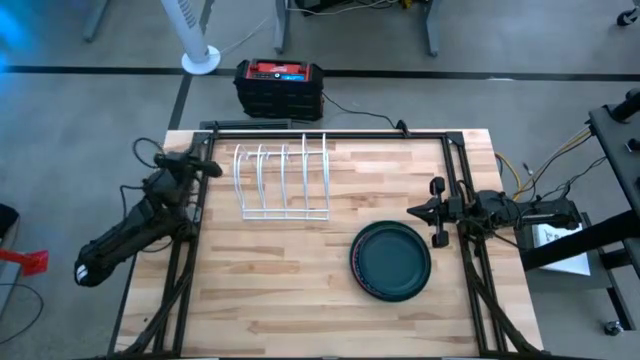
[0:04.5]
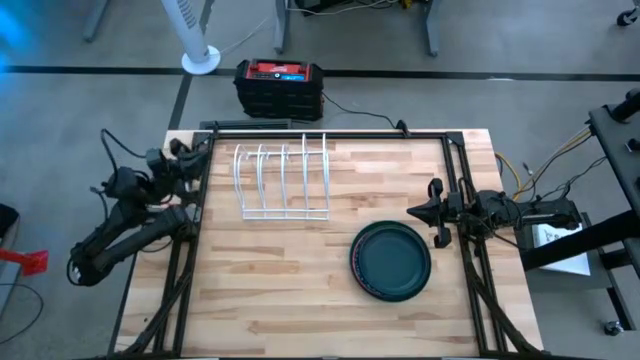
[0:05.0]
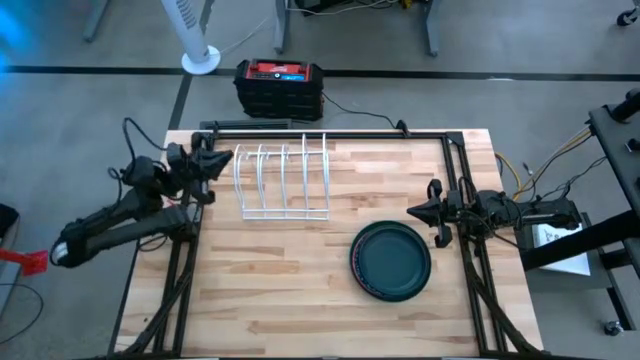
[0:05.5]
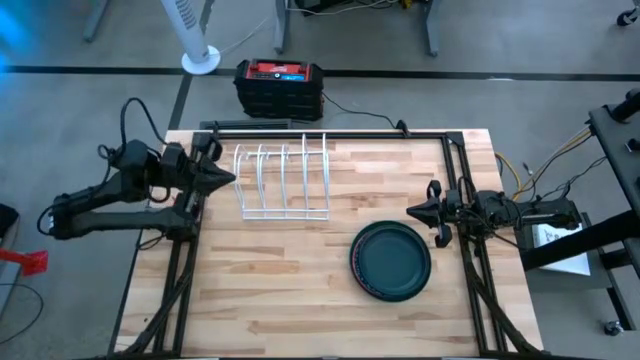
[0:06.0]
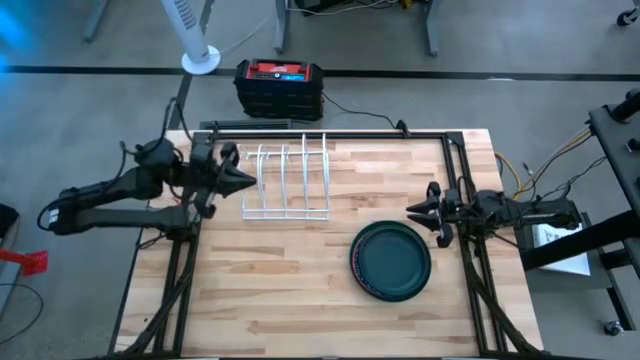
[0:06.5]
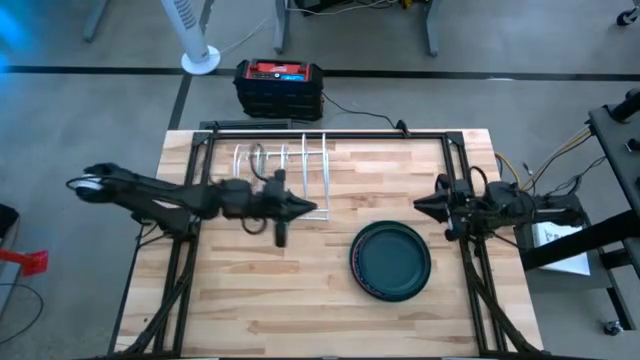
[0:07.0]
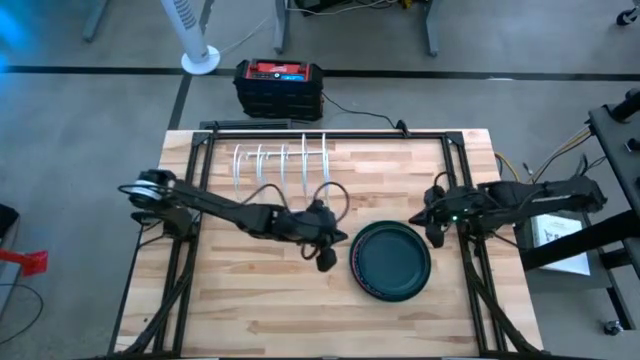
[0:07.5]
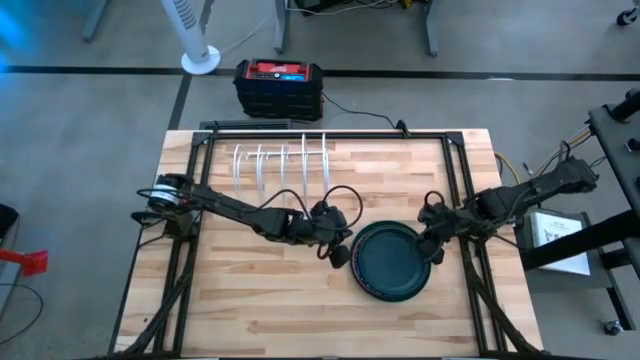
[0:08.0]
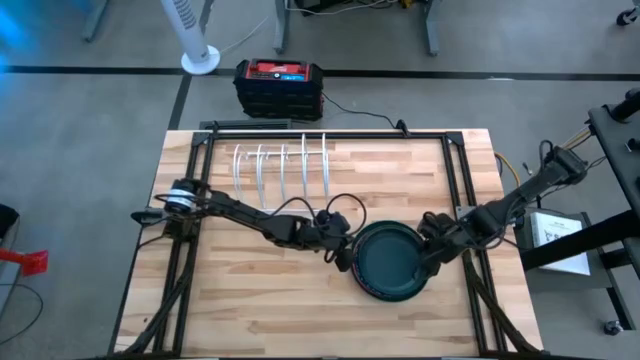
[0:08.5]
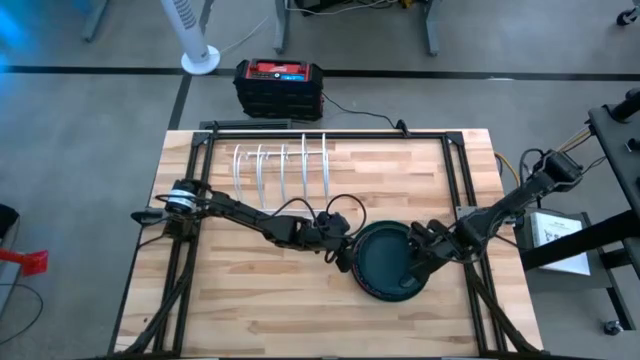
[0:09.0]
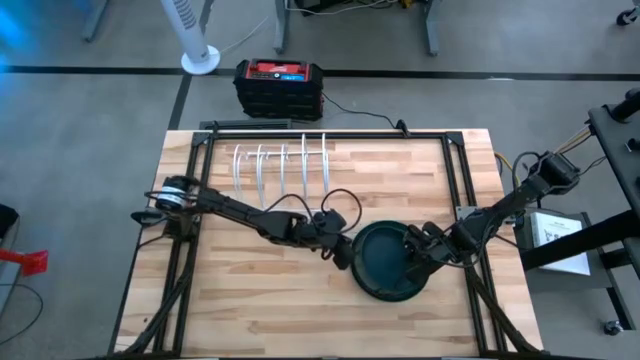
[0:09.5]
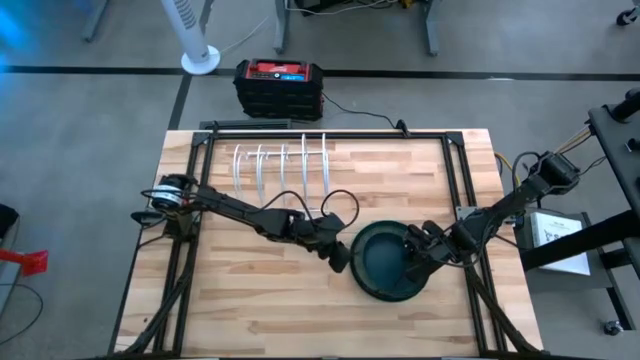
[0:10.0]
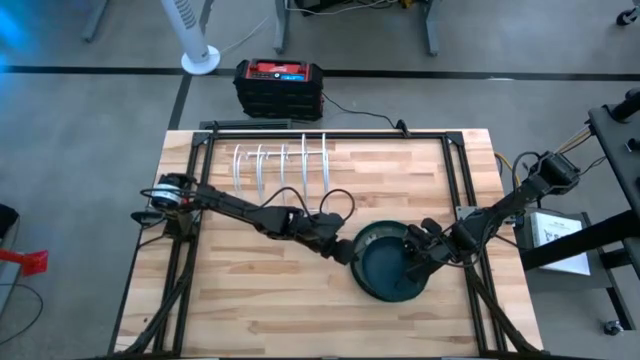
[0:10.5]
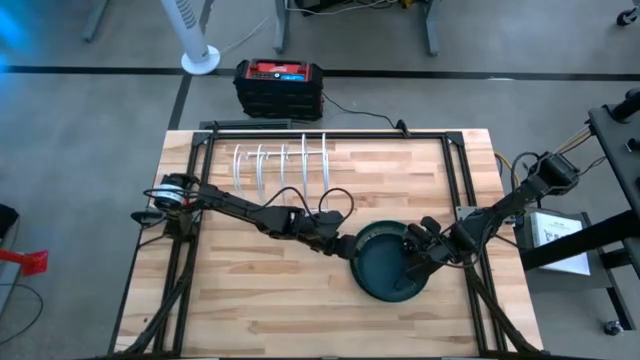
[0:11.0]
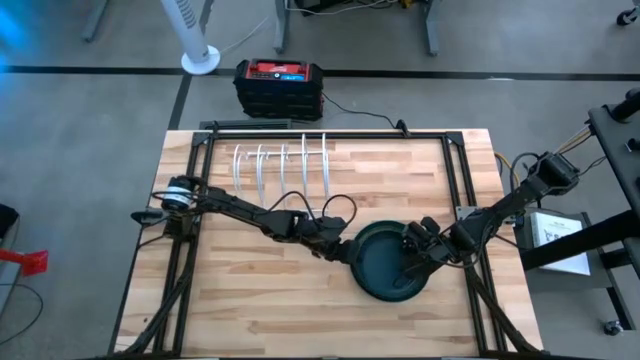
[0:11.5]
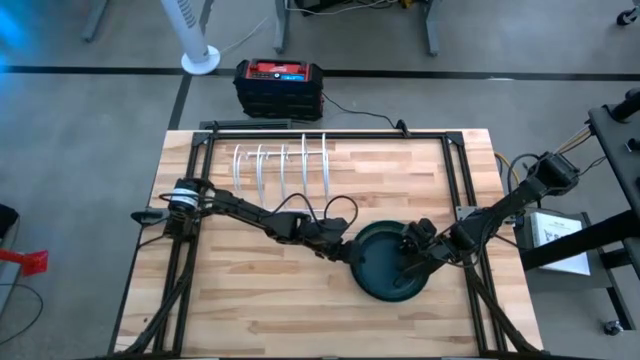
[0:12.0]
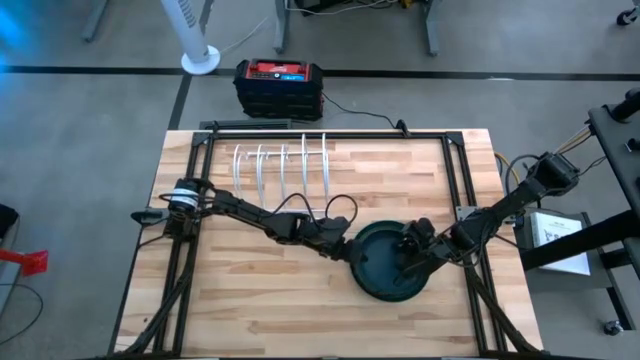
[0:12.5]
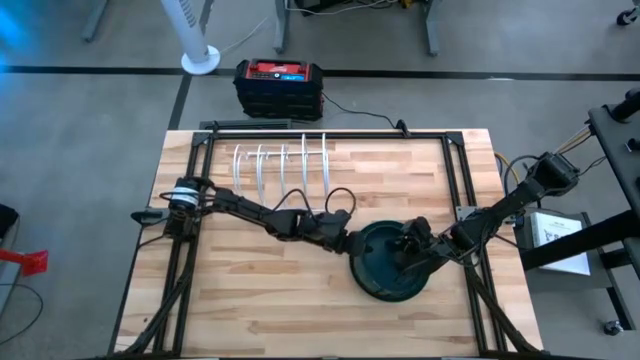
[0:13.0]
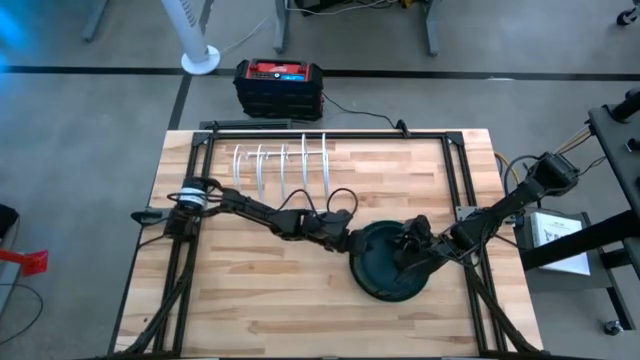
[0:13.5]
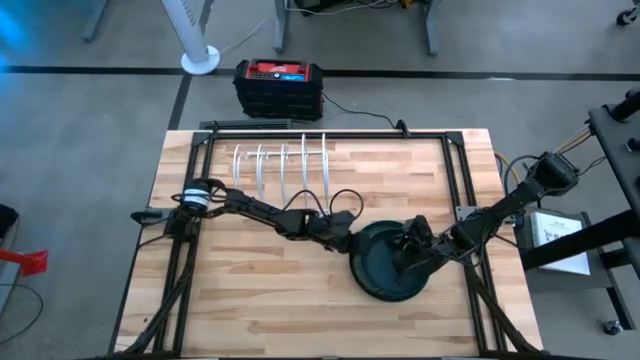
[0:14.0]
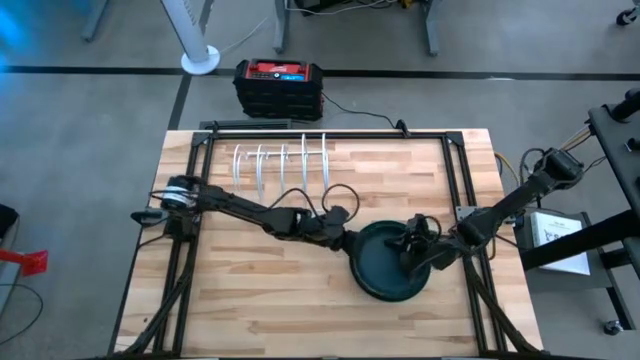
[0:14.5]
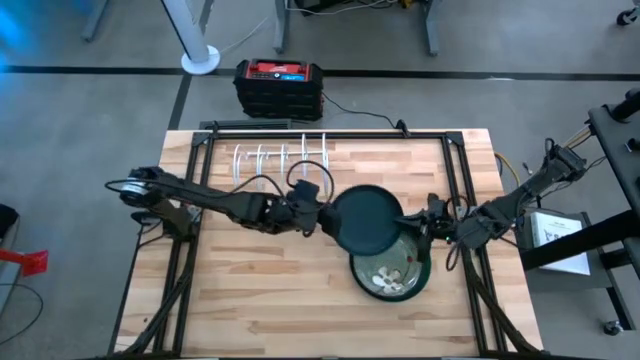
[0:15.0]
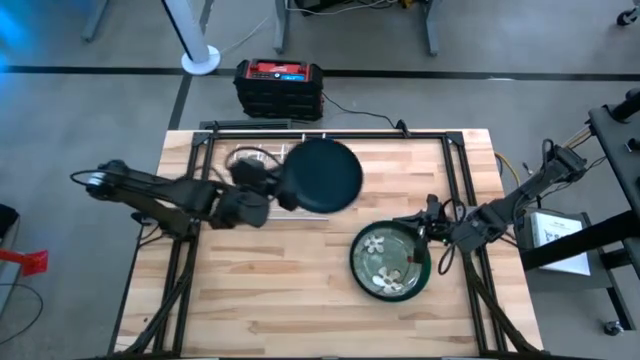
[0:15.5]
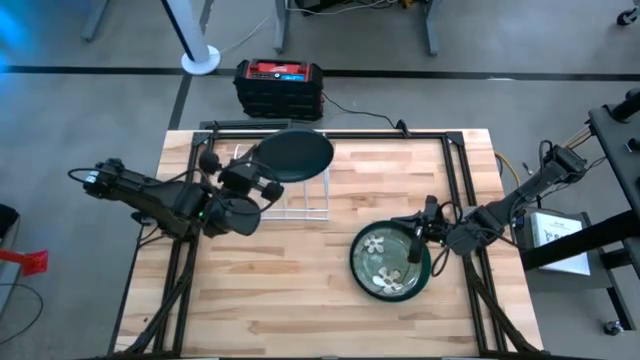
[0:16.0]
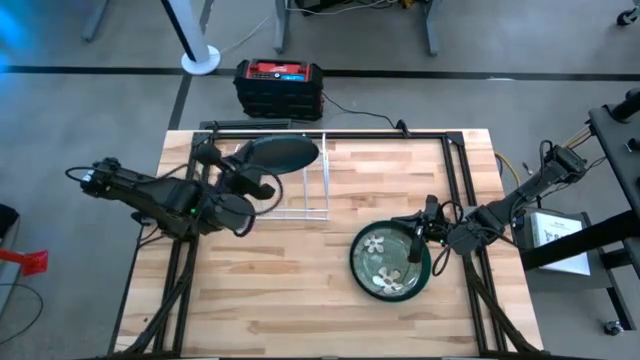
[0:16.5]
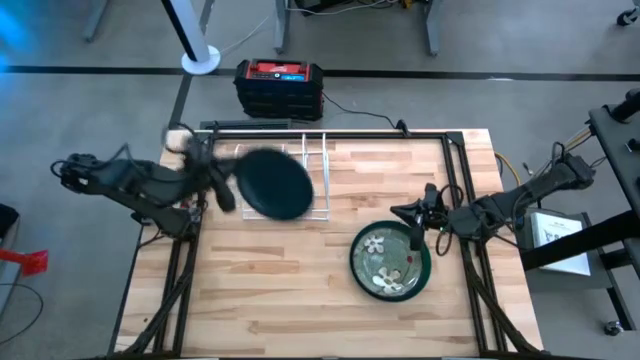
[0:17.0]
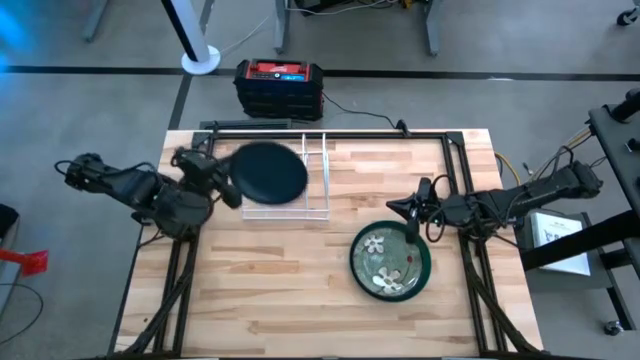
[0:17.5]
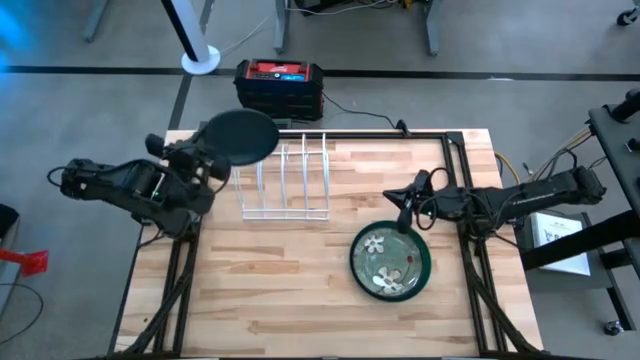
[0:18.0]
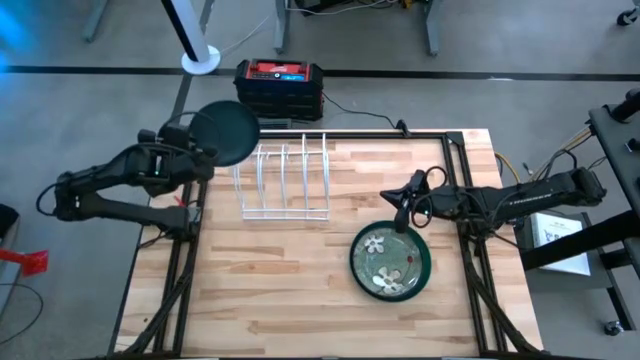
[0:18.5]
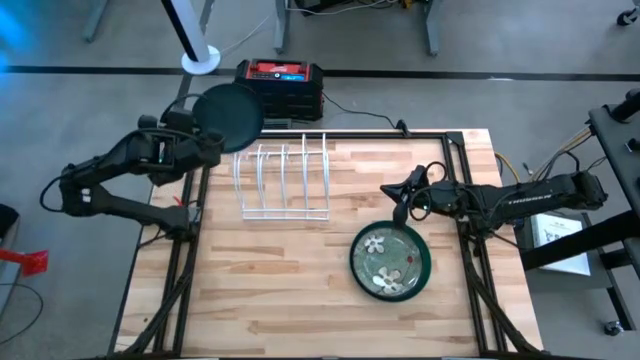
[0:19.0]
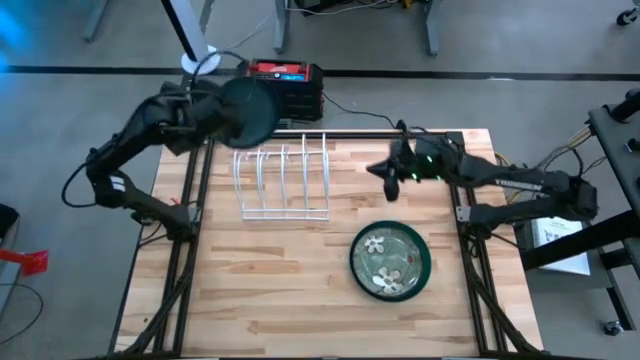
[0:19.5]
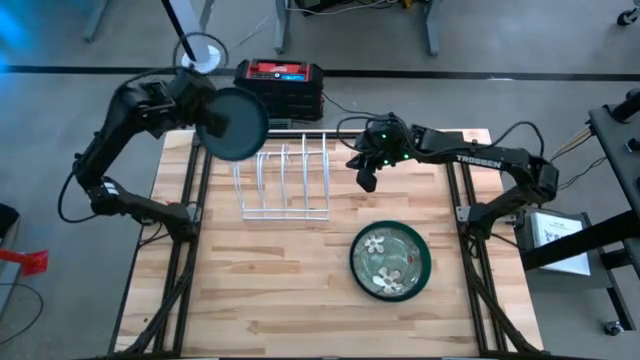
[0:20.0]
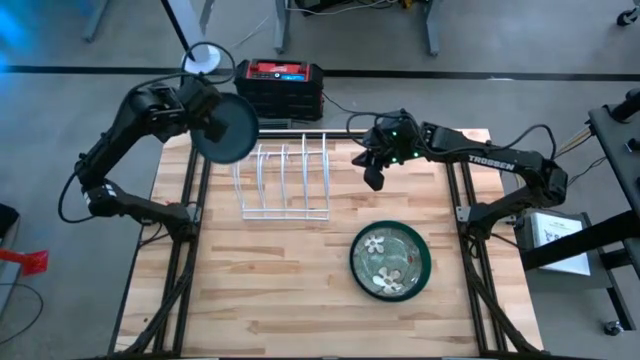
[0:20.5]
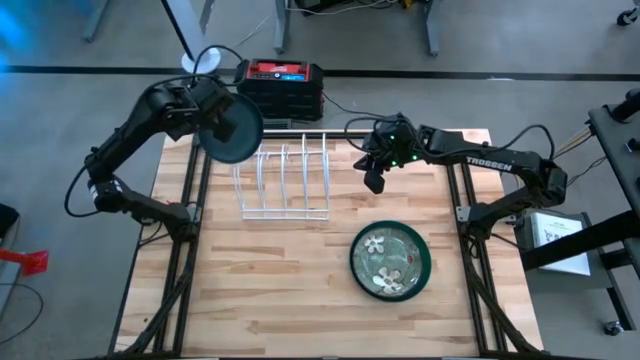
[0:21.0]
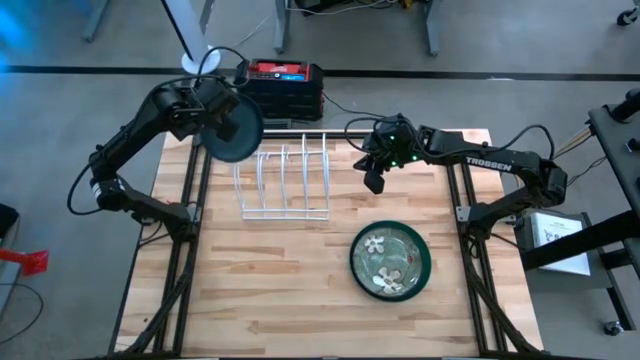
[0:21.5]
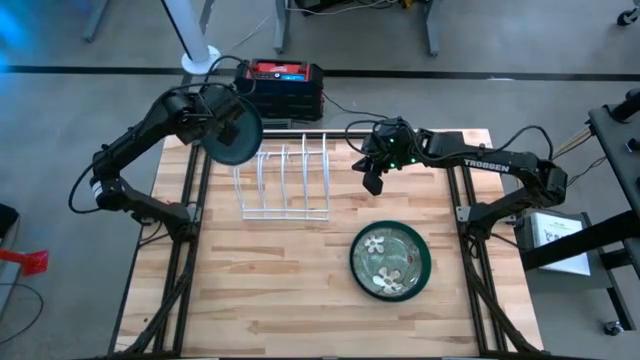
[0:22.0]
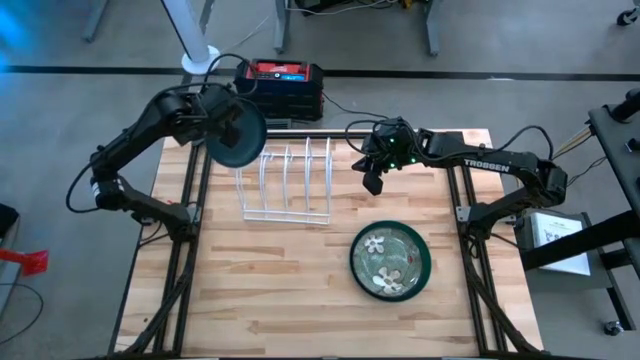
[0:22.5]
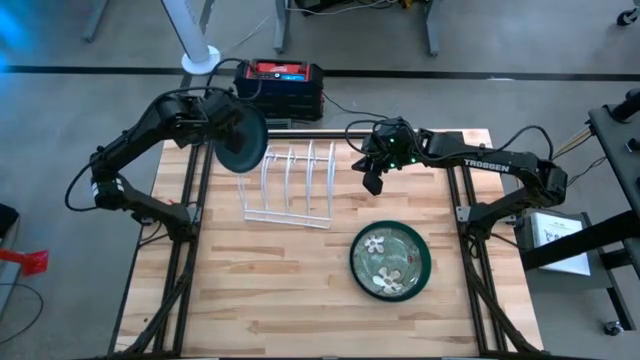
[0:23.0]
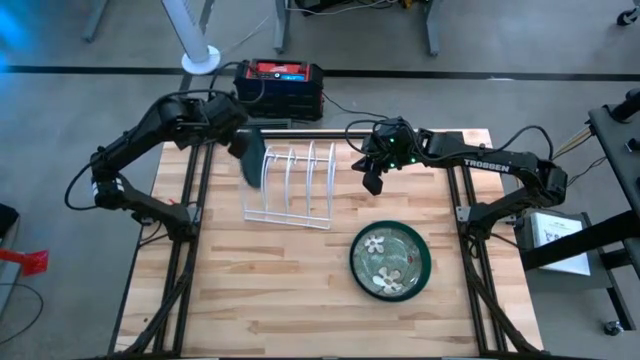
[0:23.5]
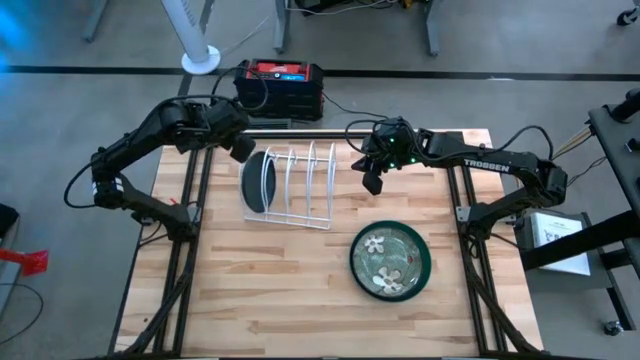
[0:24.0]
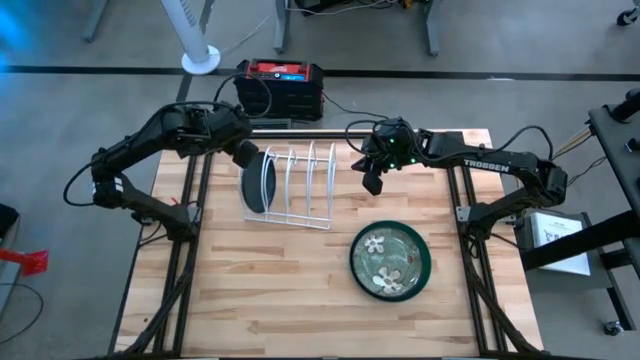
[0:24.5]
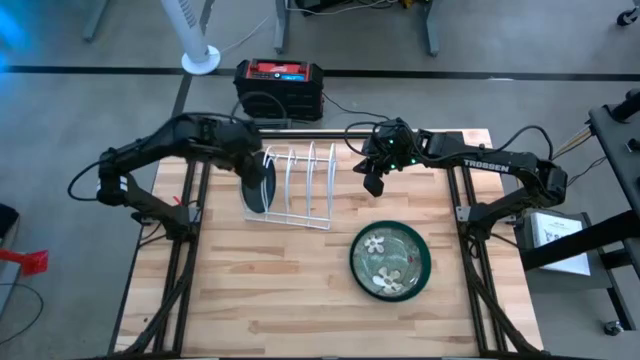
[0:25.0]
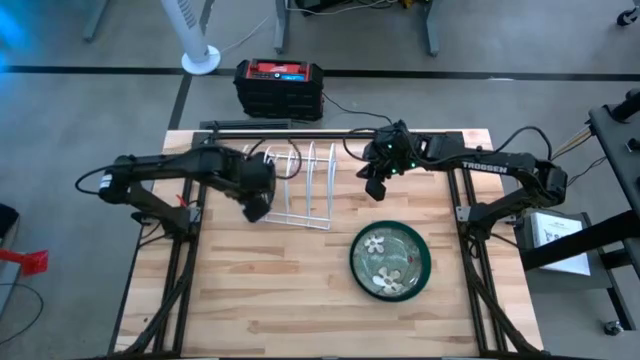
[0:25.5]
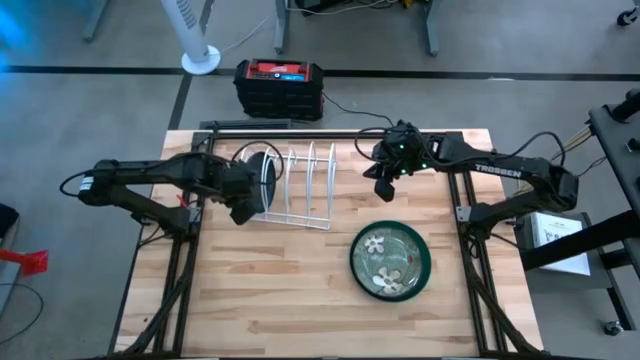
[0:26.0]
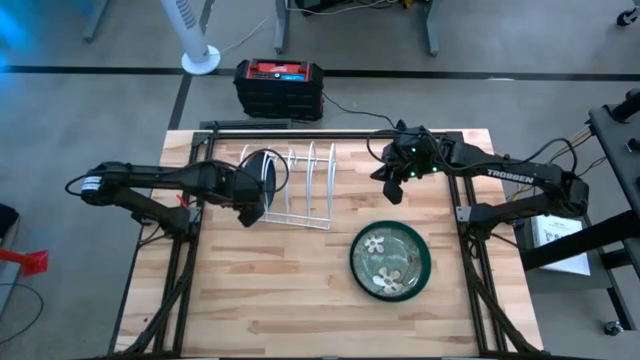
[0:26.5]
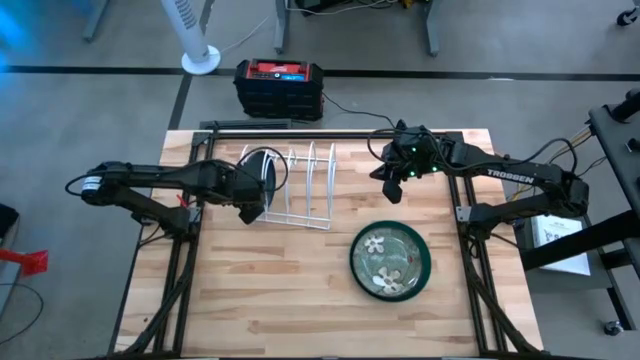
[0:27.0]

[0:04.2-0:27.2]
Task: Sort dishes
Put the dark blue plate into the white dish rack
